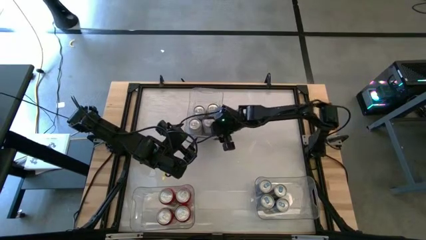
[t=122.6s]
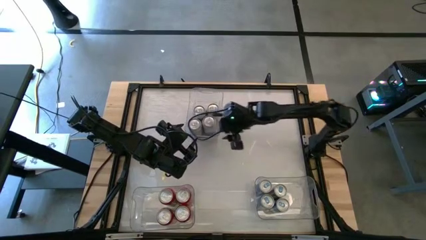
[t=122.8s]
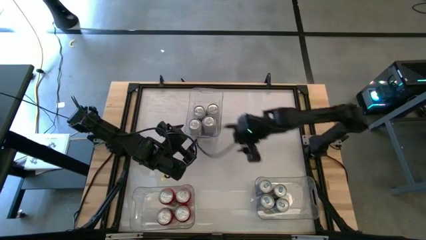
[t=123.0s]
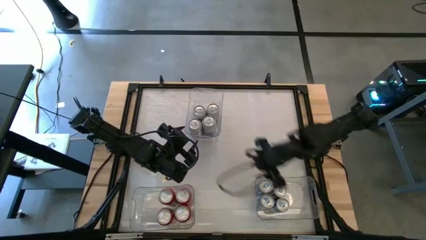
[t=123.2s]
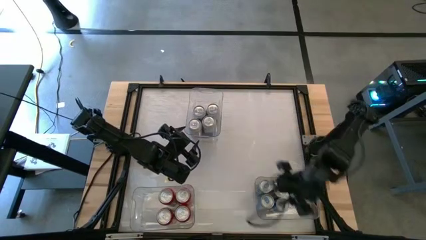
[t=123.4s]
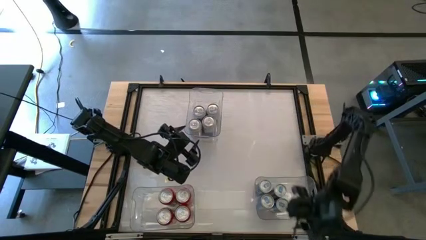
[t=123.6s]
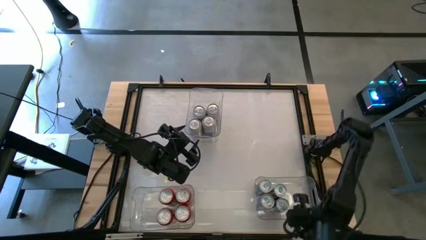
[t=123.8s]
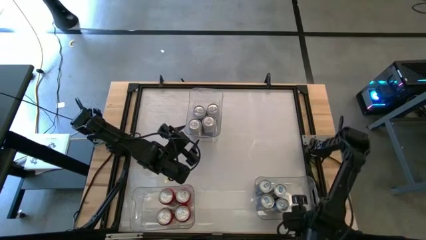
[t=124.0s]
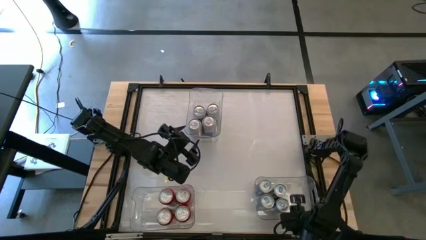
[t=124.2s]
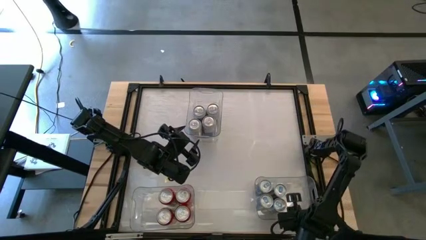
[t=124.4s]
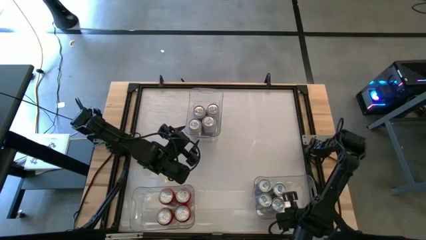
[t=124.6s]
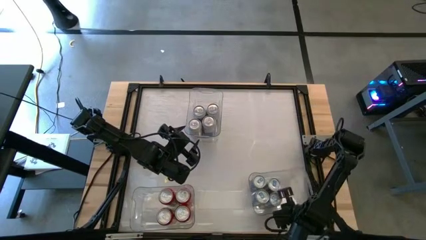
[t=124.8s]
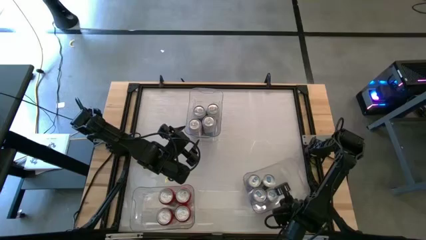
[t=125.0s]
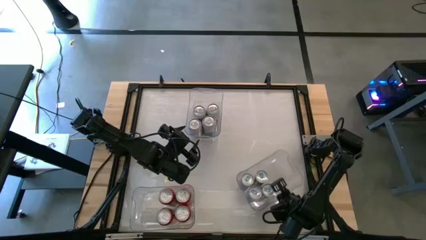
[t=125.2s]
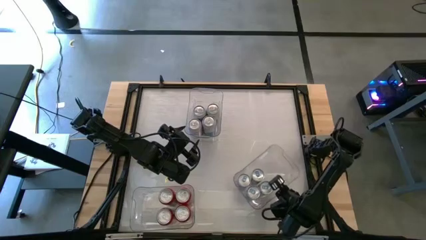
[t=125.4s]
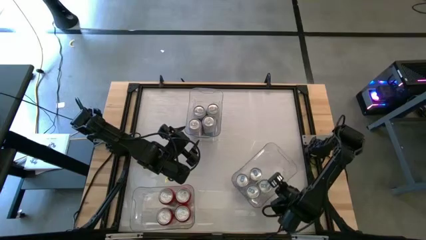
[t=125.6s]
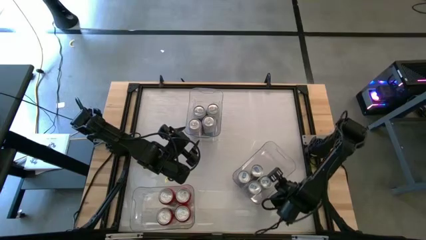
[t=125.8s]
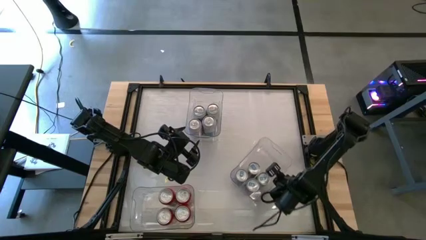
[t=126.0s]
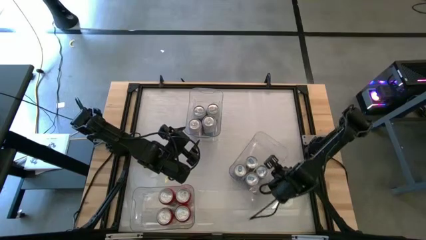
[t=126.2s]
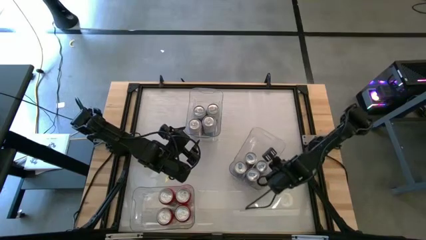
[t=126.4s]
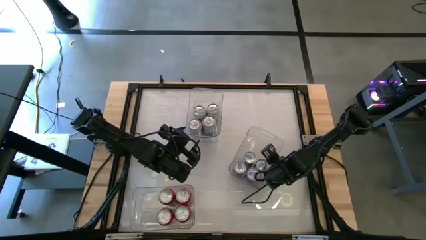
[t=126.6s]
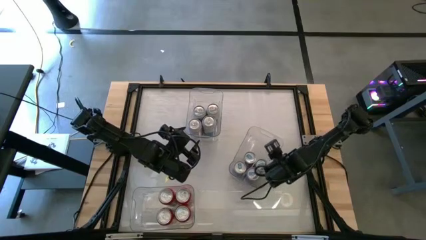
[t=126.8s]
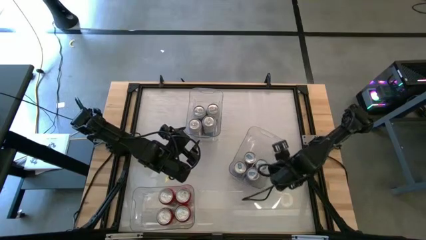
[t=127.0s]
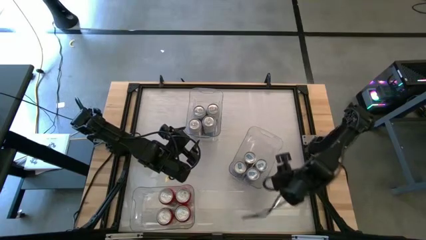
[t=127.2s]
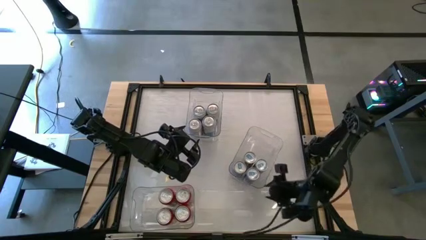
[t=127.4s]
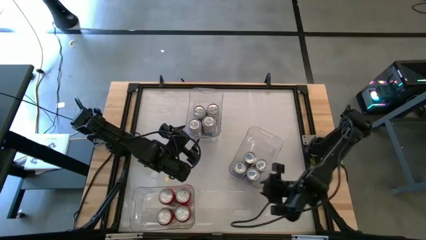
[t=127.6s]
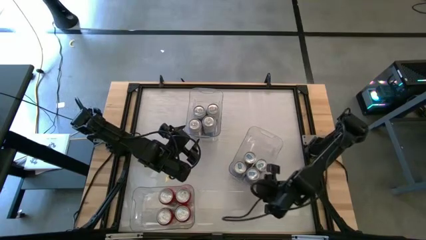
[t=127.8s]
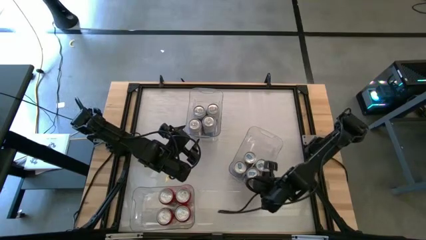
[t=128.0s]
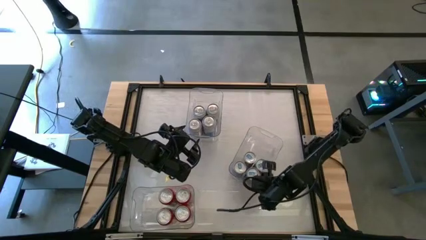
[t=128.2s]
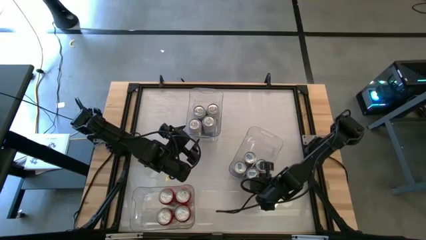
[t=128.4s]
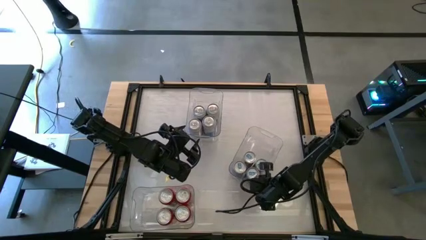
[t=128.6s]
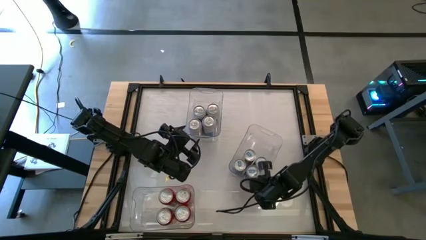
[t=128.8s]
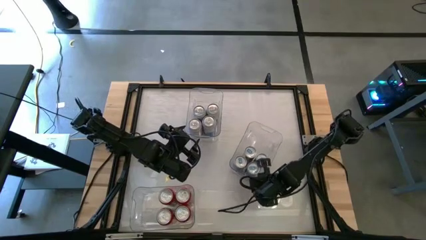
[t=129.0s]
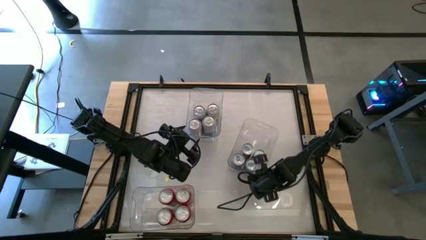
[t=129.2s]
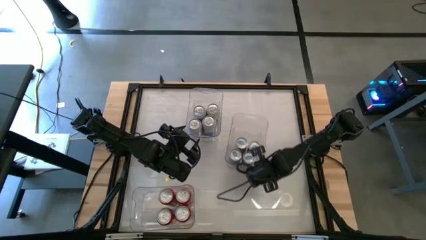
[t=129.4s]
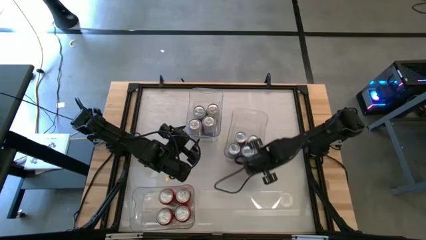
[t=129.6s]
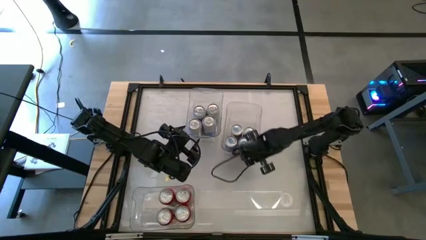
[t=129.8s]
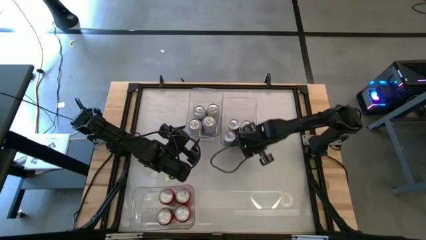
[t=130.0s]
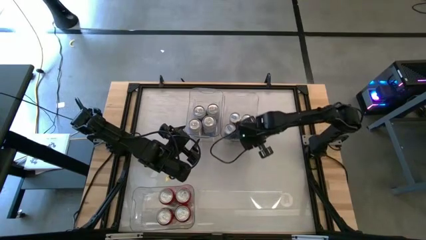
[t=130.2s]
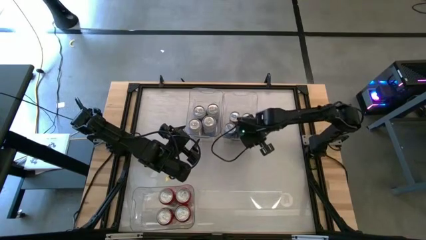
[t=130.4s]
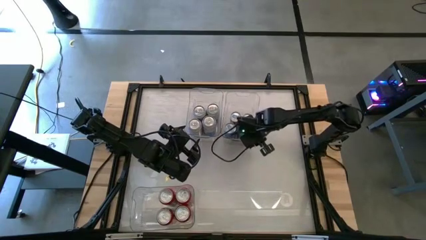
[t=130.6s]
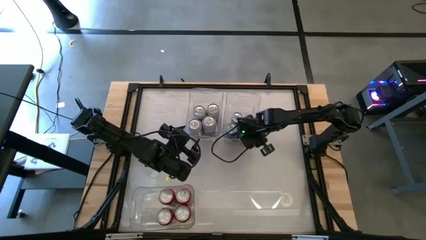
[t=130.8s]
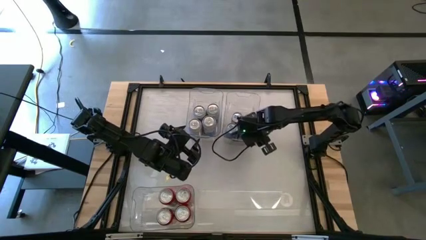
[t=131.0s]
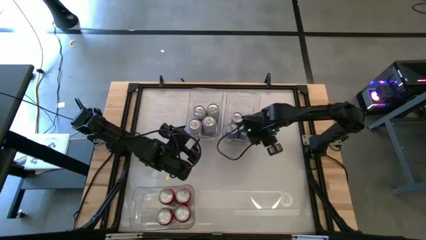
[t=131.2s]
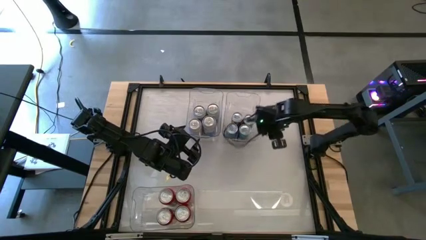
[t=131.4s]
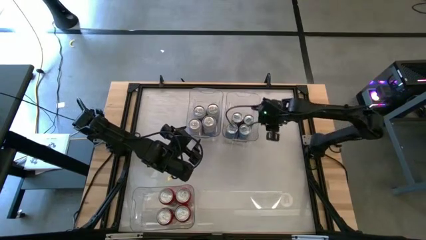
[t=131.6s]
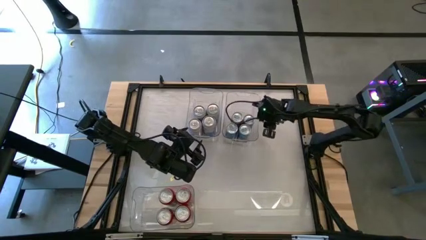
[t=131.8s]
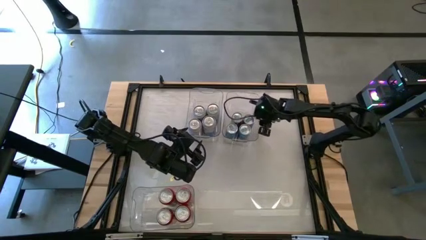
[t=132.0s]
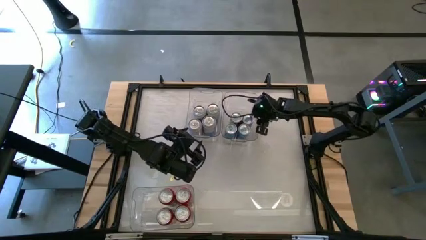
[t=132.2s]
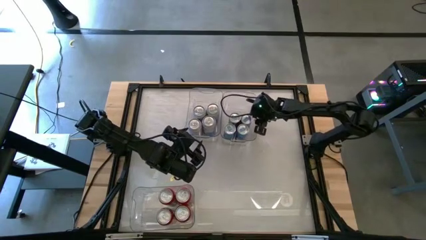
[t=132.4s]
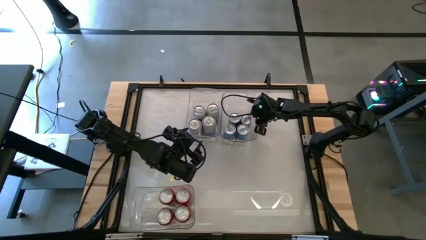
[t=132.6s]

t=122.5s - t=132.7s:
Task: Sort soda cans
Move the bottom right transparent bin to the top center of the table

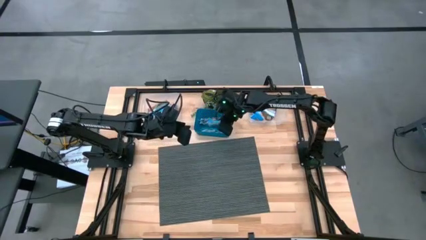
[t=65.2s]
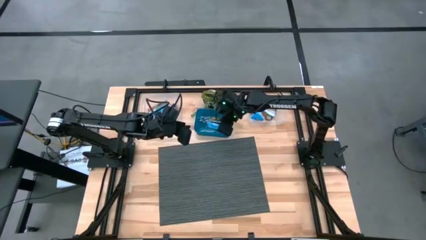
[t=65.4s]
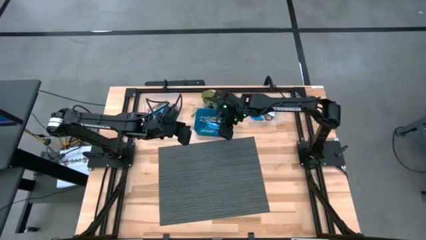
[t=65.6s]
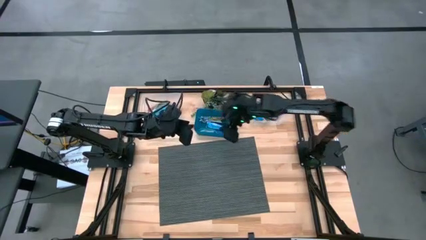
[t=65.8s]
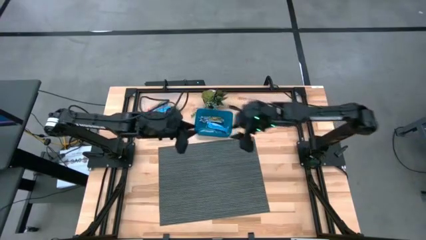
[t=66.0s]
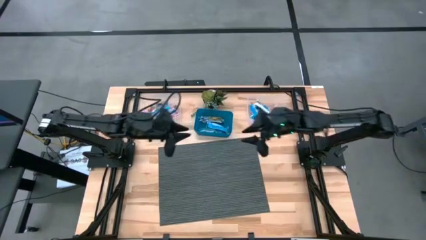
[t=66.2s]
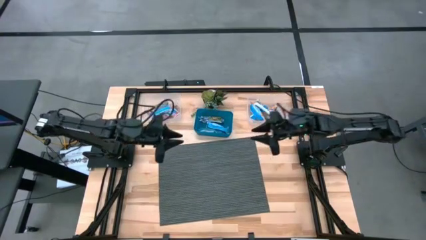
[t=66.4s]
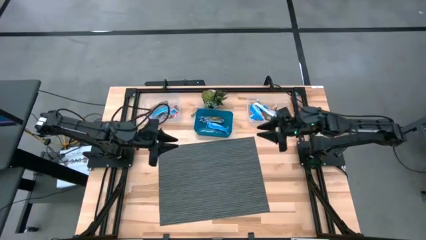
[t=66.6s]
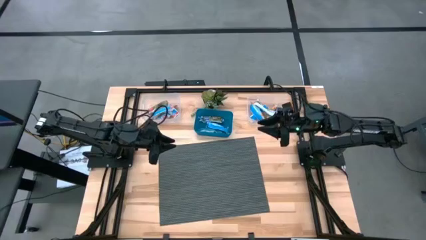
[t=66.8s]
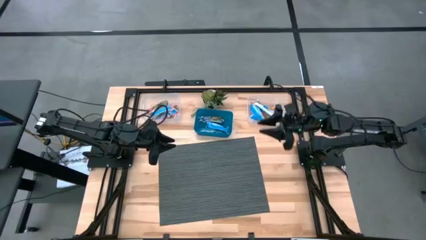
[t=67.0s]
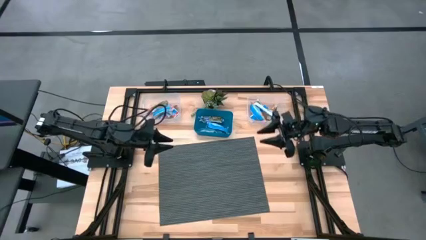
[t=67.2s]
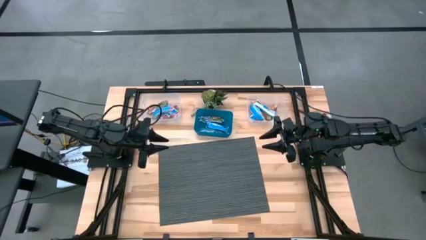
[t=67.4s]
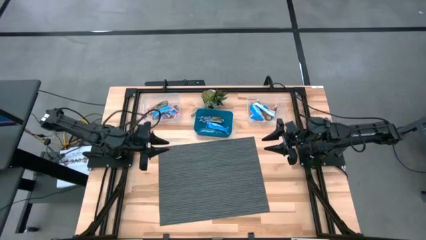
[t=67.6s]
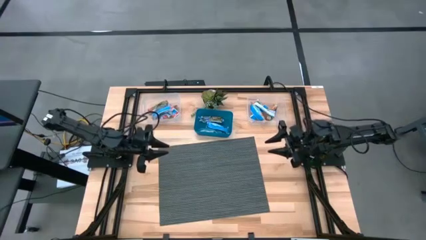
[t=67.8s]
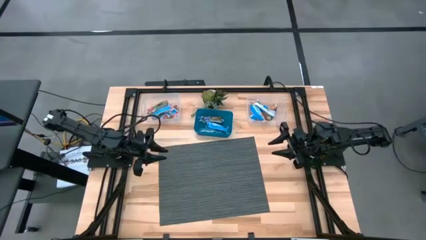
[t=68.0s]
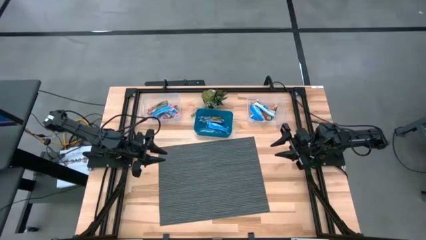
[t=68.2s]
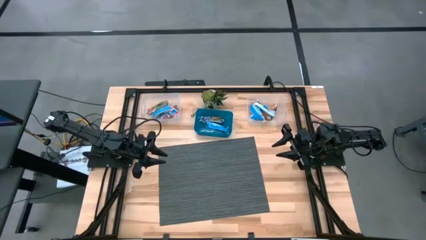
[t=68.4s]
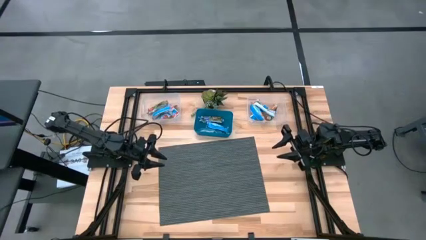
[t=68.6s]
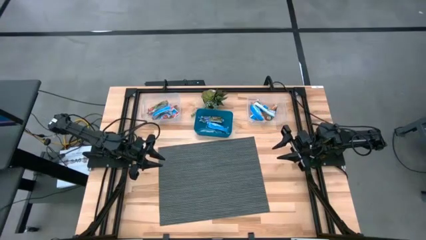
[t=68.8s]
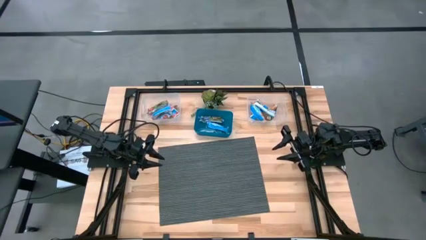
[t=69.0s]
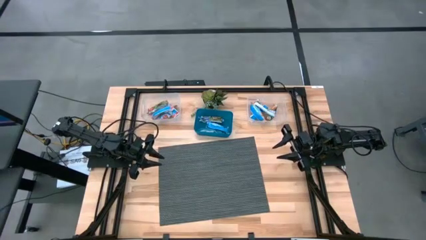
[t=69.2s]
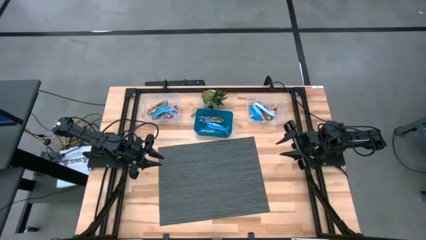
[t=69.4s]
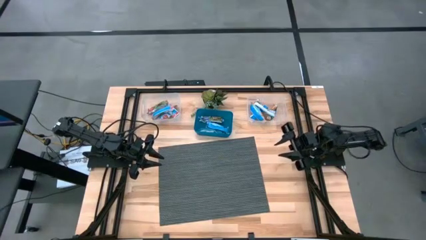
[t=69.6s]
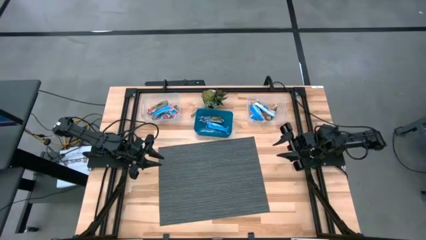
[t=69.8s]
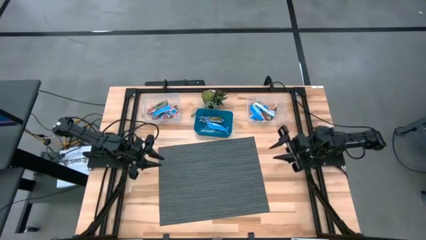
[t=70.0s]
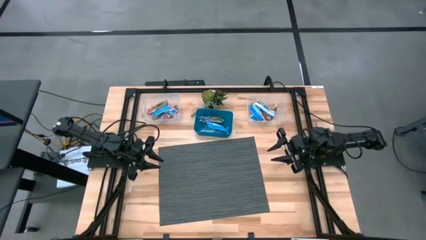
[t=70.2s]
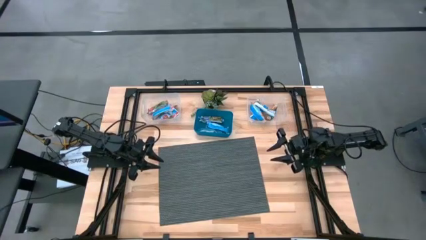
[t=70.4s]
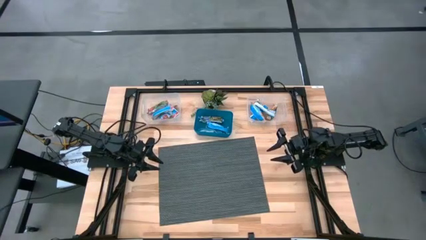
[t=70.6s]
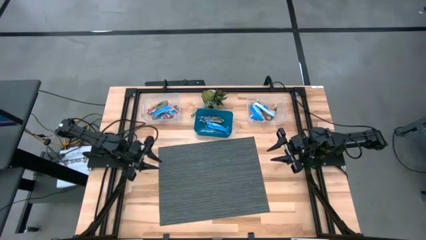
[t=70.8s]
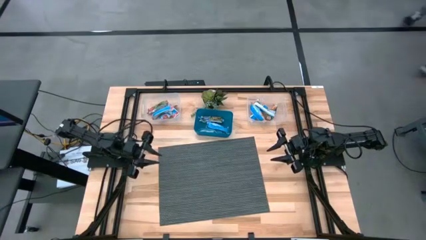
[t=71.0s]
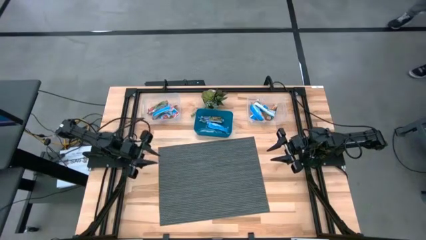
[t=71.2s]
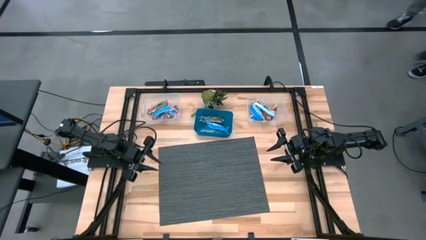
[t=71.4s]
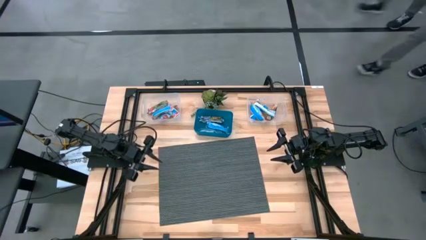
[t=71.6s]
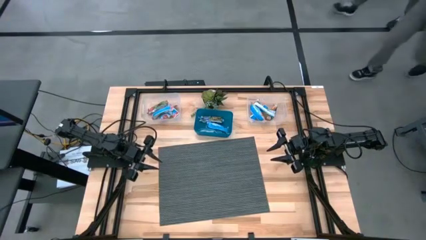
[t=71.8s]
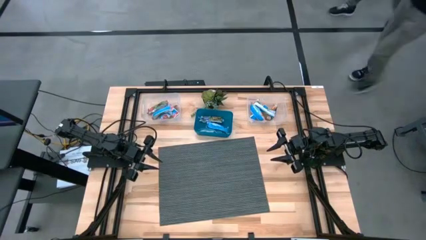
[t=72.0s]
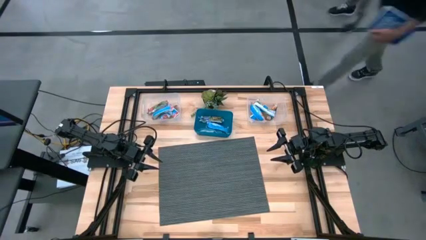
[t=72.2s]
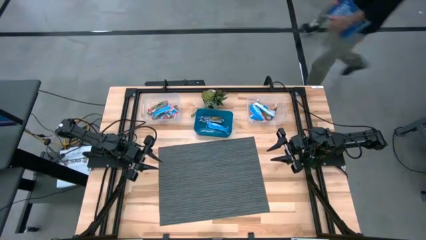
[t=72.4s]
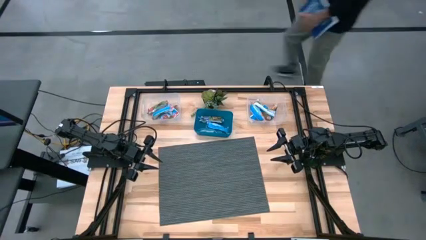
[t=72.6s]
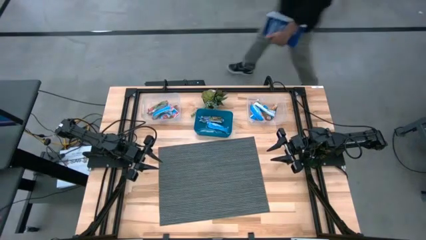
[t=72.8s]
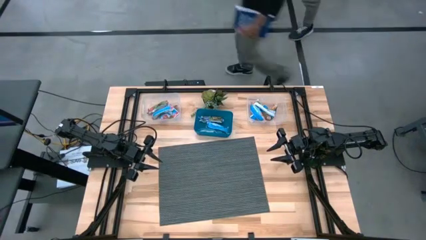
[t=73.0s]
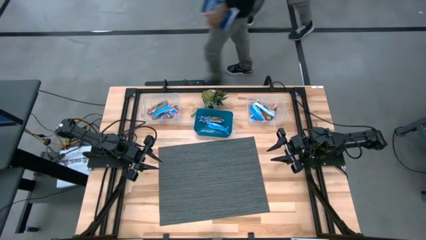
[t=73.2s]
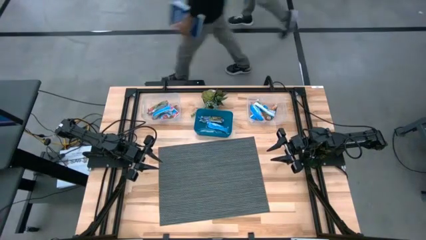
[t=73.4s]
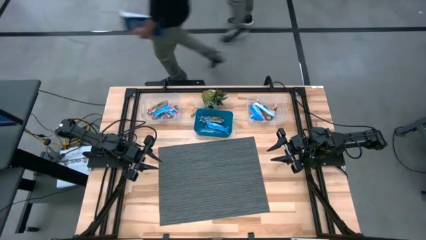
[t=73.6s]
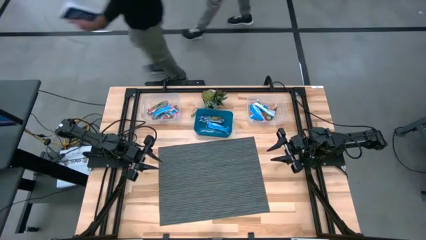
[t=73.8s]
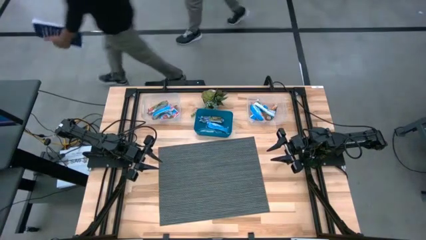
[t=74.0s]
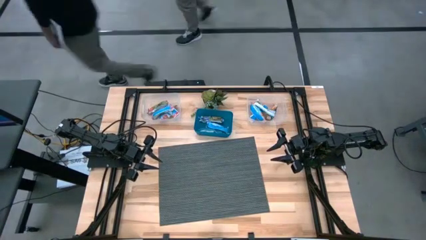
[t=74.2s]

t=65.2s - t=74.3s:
Task: Pick and place Granola Bars by type
Return to Home Position
